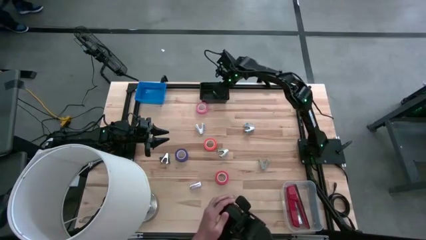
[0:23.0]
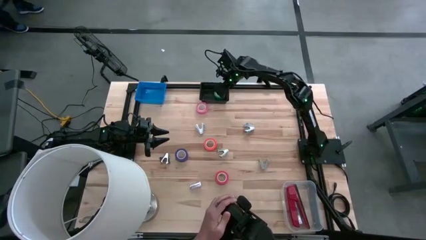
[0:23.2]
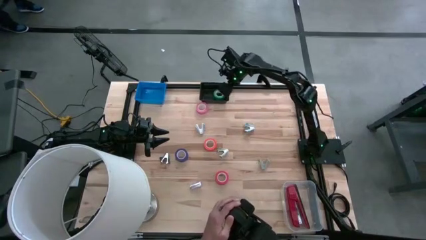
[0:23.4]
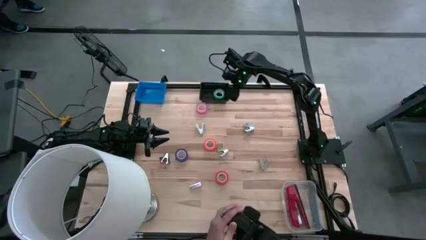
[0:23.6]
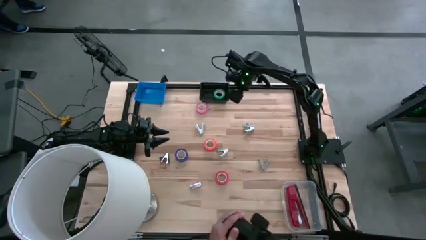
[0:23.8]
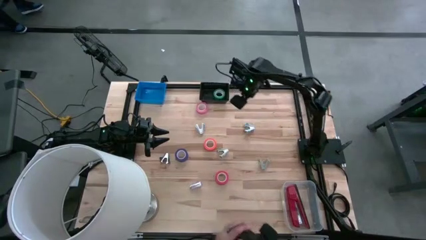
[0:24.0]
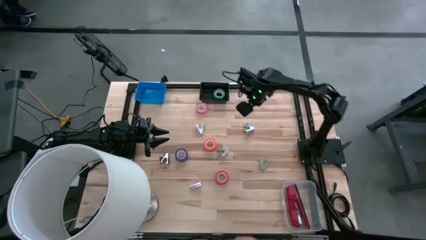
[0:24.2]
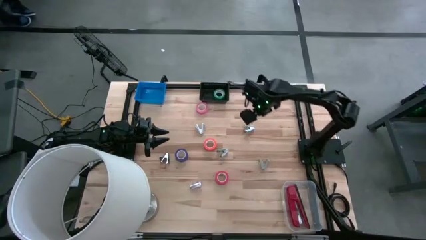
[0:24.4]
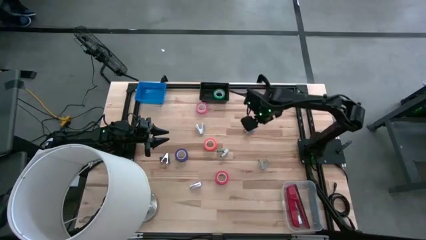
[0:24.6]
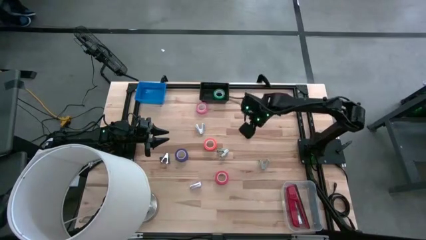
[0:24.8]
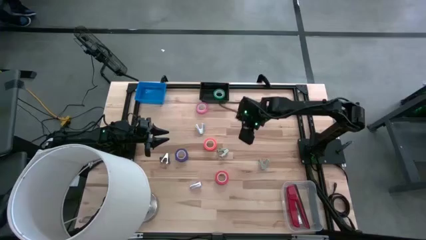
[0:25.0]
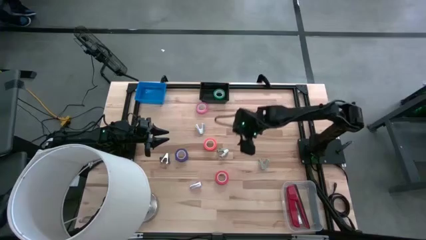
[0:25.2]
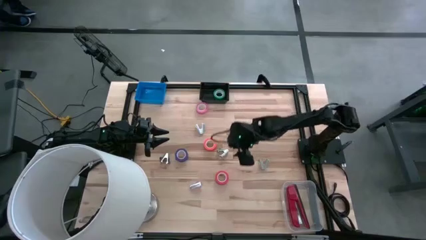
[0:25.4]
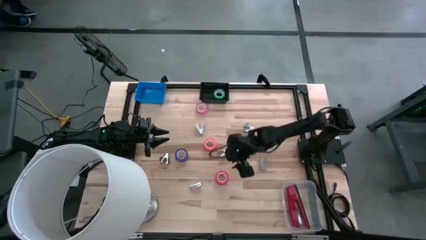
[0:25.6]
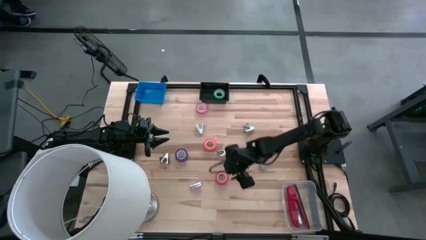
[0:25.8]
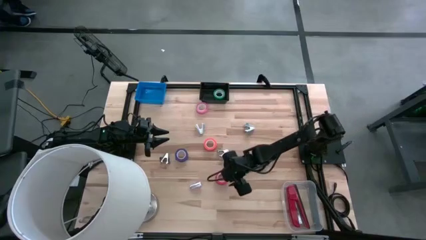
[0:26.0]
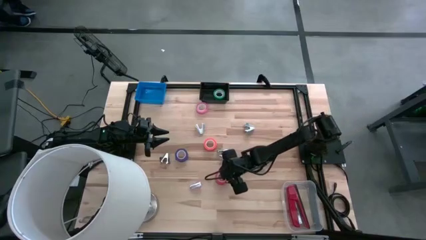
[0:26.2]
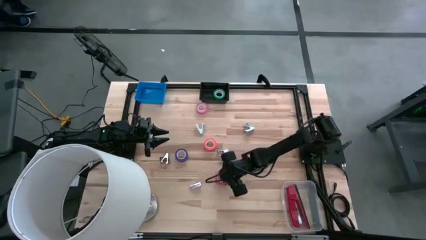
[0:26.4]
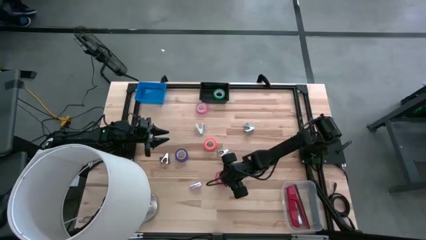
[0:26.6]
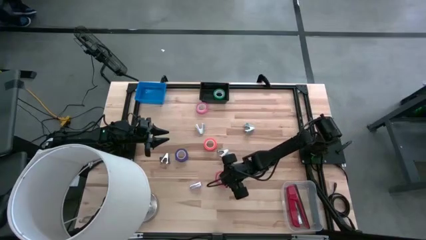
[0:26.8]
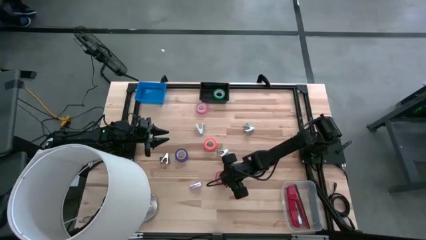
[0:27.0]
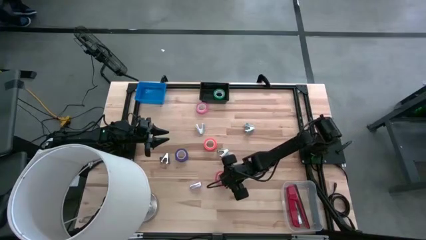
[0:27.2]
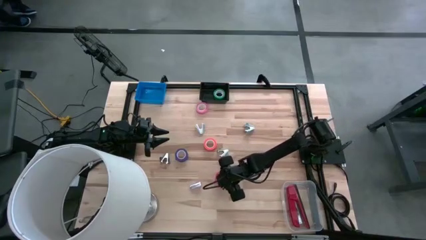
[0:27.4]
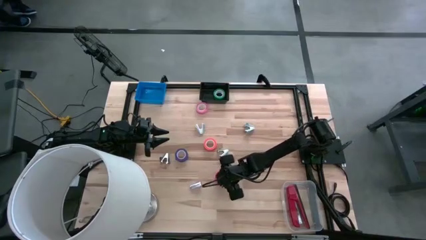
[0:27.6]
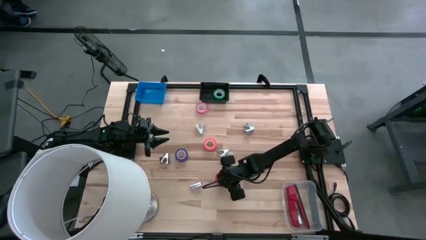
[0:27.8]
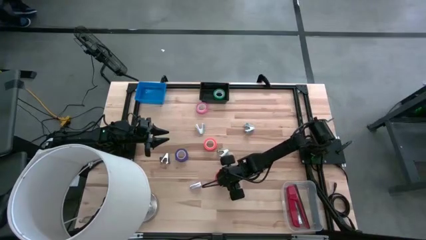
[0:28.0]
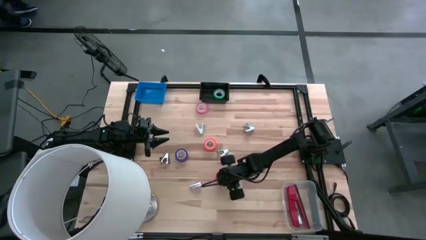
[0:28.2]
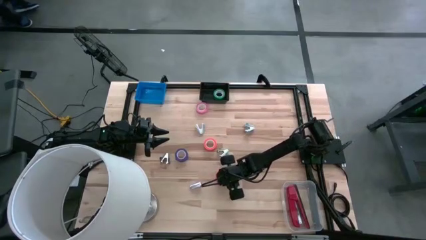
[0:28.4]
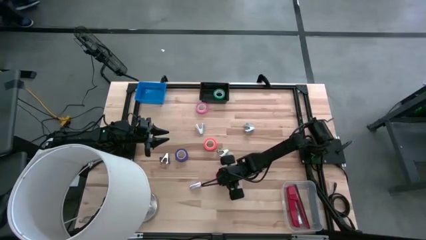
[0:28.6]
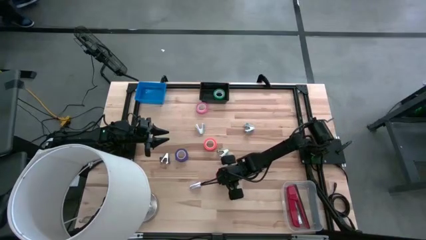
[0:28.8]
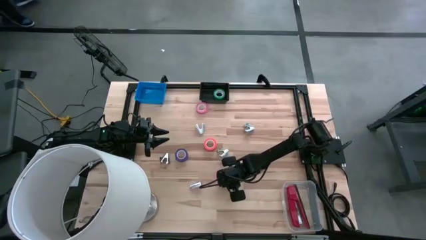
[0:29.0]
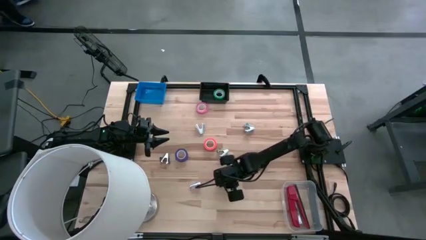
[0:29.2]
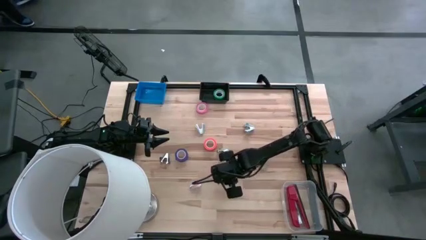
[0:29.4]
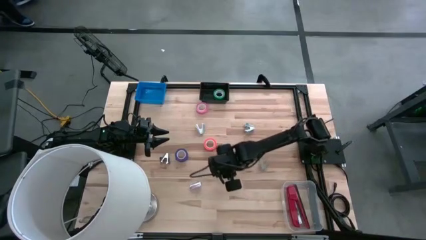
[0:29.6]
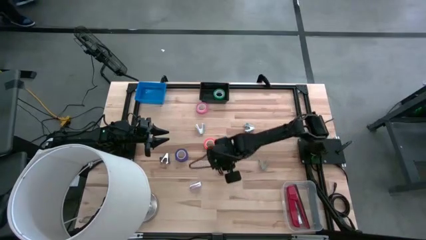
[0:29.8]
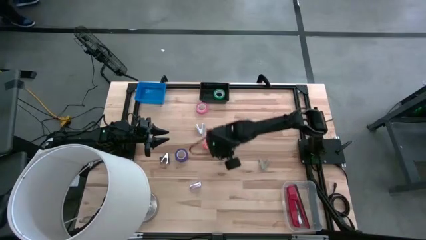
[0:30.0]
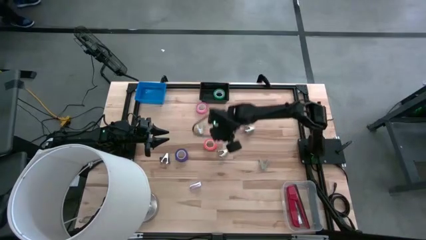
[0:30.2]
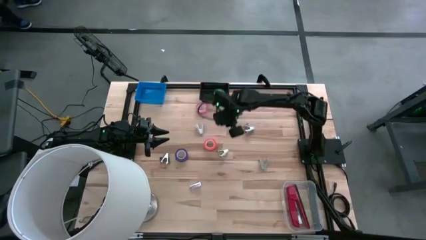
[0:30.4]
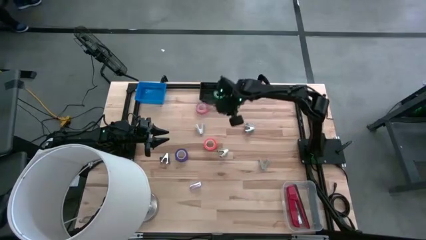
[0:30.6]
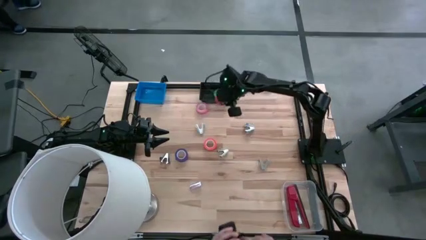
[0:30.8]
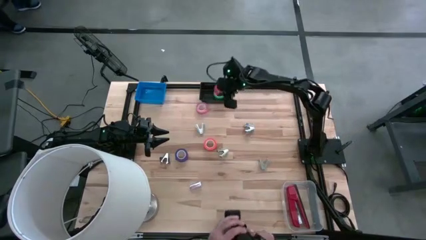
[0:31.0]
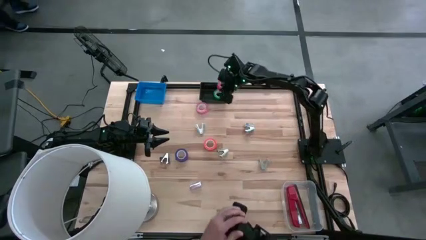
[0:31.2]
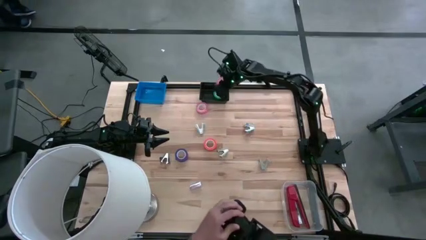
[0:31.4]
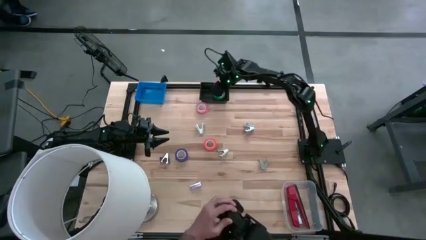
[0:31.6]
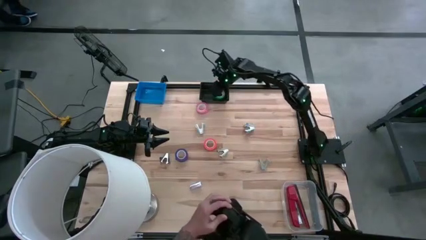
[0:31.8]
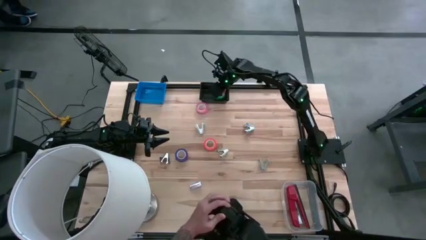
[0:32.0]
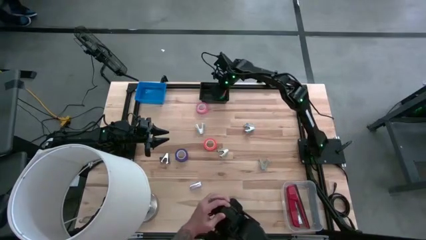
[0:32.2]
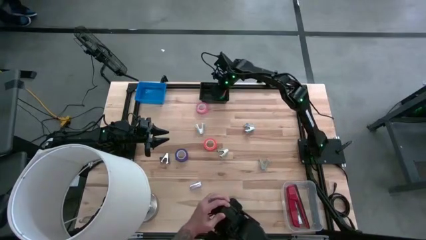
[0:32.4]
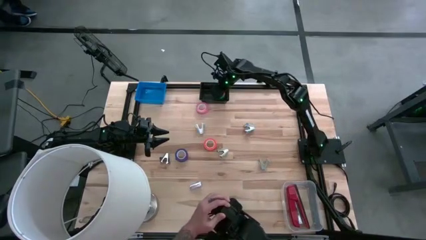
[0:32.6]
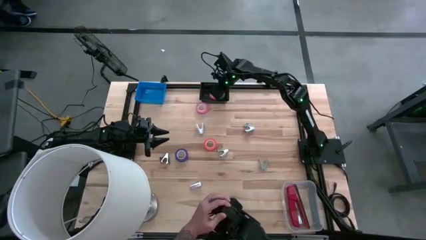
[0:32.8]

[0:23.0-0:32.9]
Task: Pick and place Stapler, Stapler remover, tape
Put the red tape into the black bin

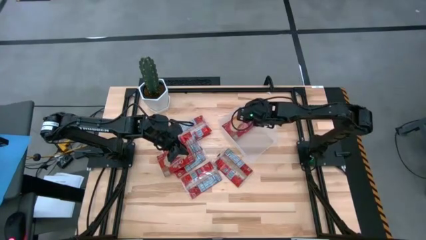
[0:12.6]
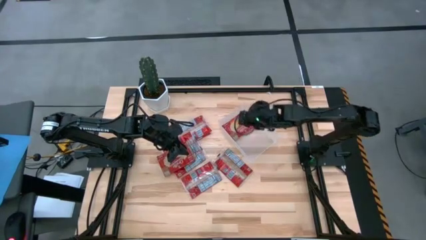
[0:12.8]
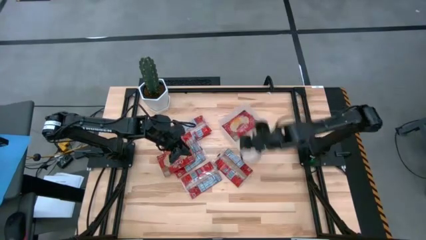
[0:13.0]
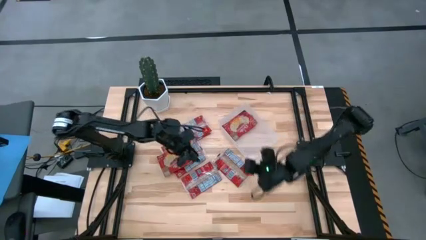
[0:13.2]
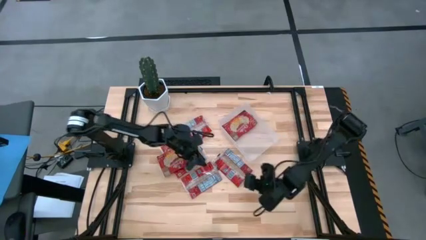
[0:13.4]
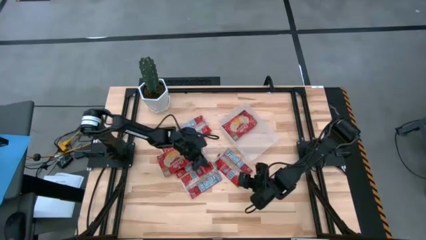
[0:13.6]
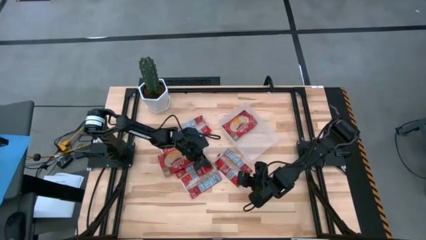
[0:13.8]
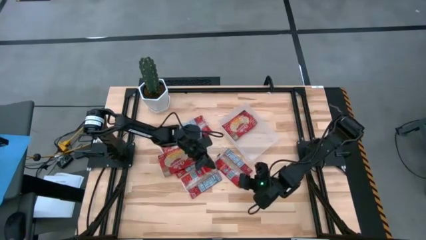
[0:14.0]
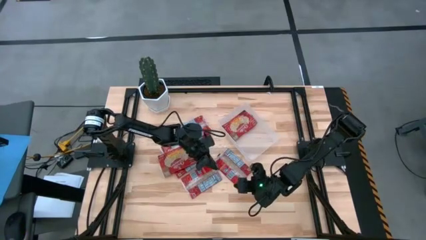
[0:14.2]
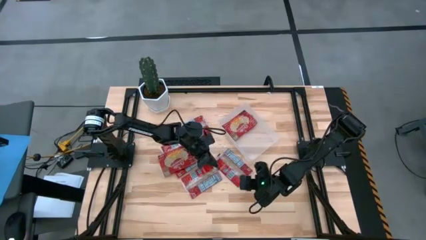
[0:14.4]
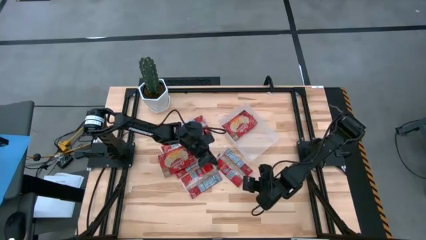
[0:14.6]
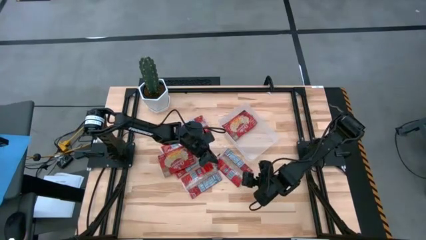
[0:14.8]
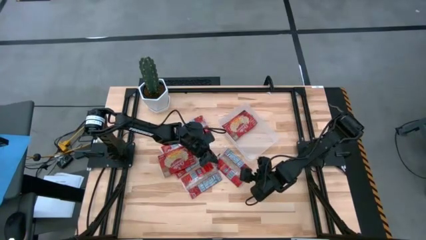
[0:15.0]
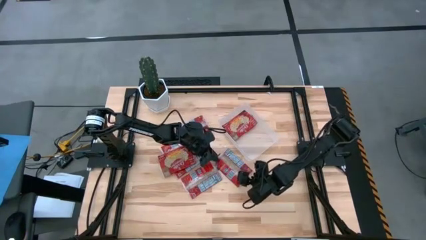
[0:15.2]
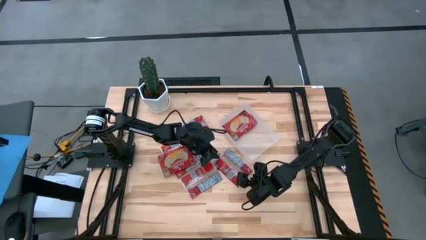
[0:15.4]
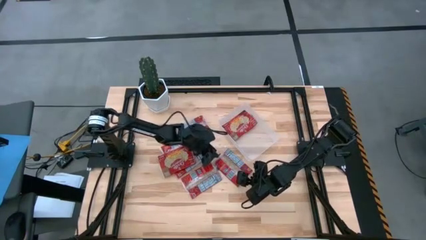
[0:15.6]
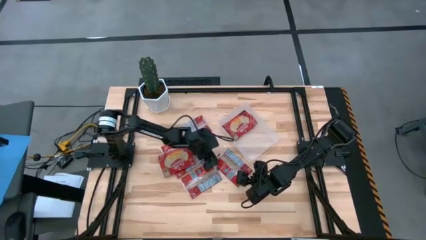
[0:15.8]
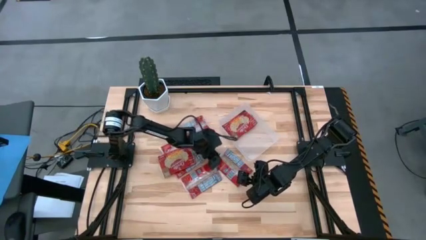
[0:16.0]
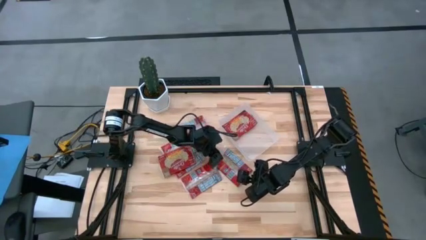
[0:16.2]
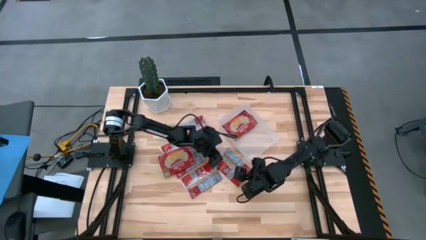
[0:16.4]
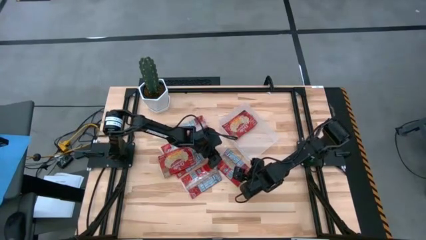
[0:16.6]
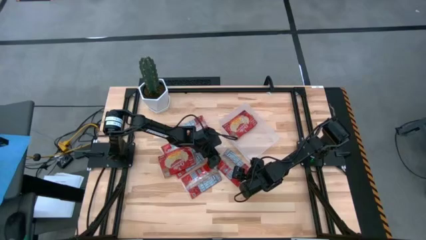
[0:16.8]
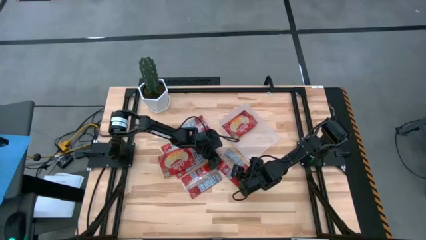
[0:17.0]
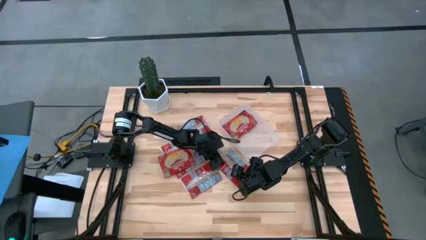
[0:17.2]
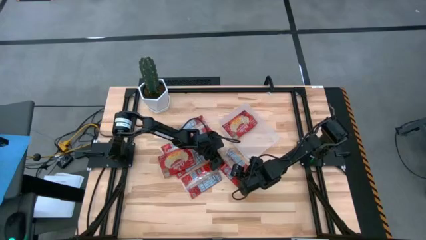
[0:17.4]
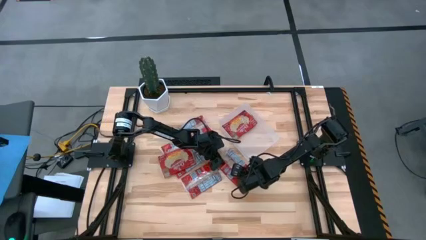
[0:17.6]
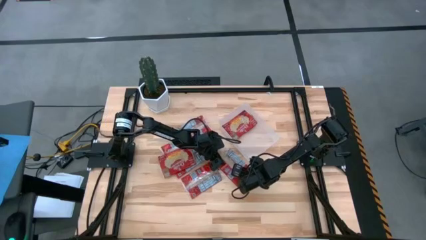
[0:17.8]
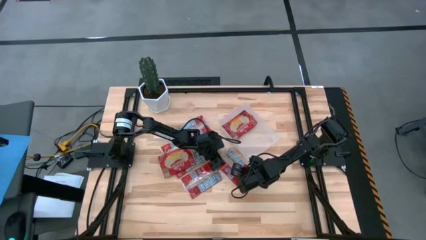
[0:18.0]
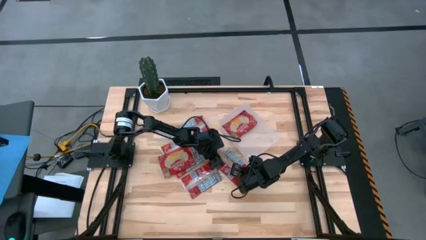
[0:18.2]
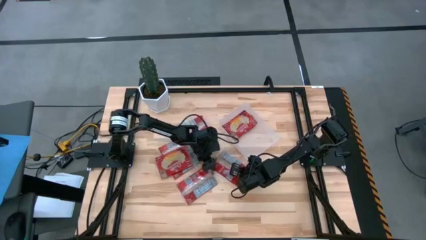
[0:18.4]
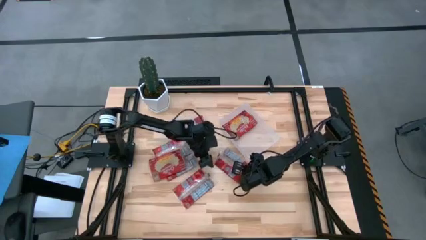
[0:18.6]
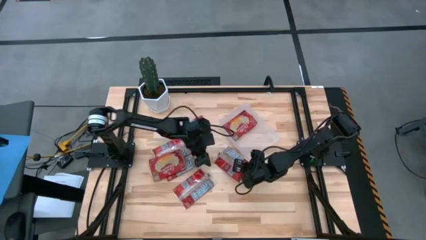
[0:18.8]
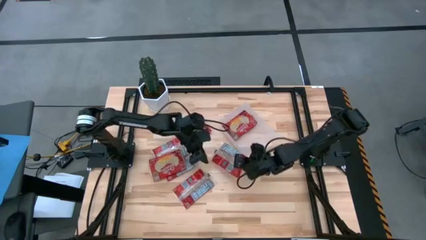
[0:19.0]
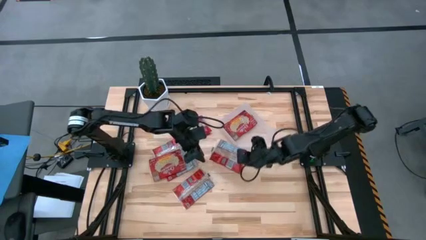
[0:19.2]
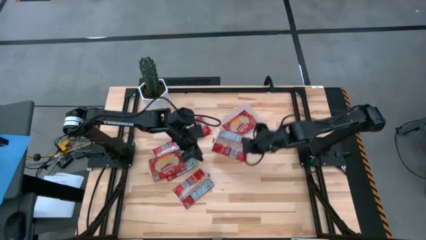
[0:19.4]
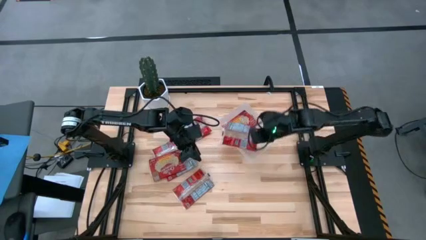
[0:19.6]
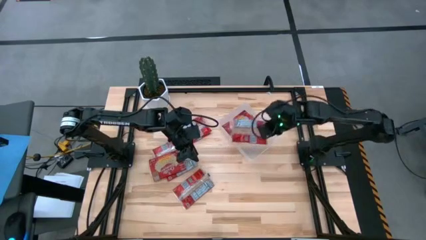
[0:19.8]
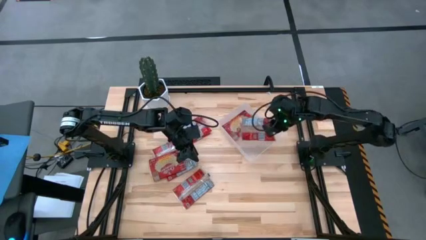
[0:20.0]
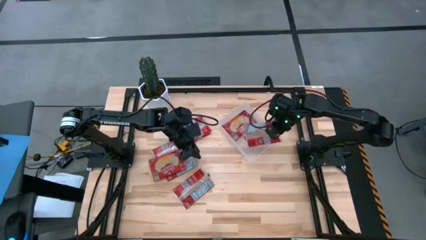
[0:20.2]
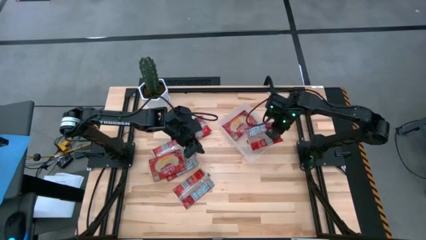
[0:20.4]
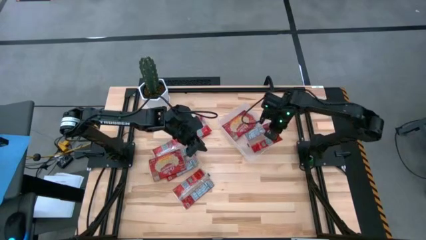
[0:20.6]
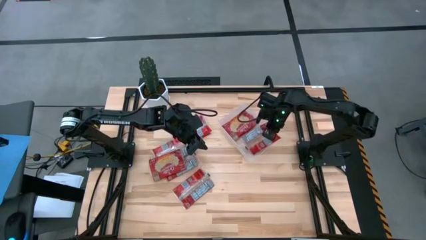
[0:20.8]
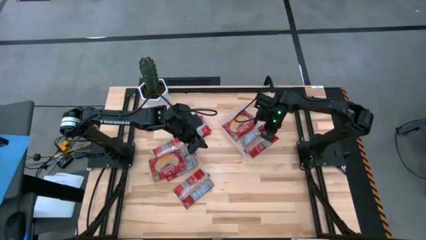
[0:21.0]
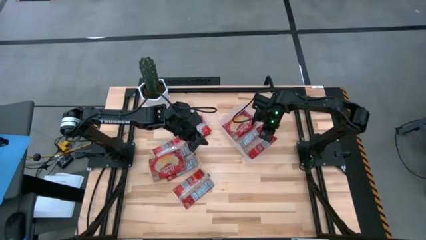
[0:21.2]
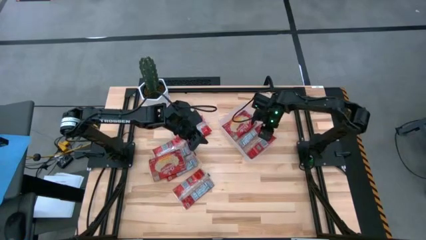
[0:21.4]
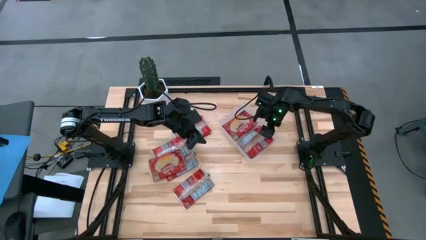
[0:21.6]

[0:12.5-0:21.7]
Task: Sort popcorn bags into baskets
Put the red popcorn bag into the transparent bin
